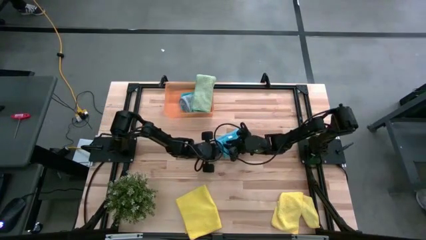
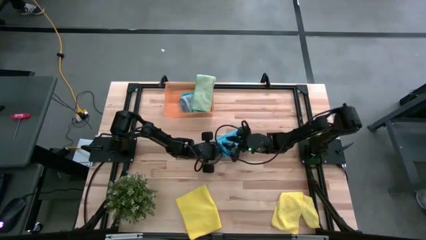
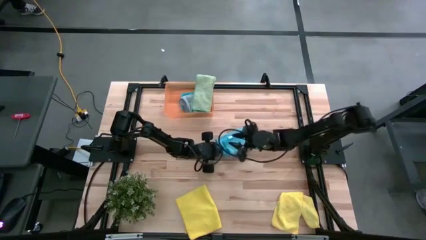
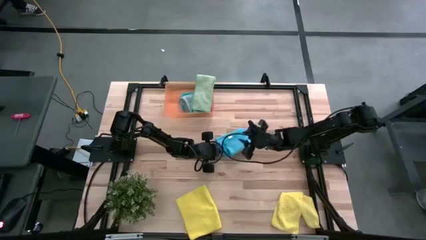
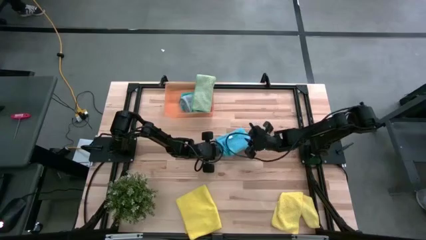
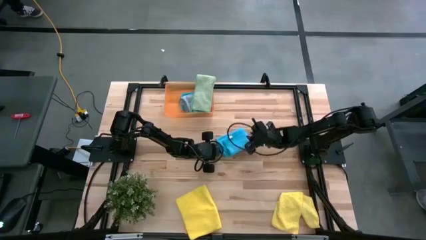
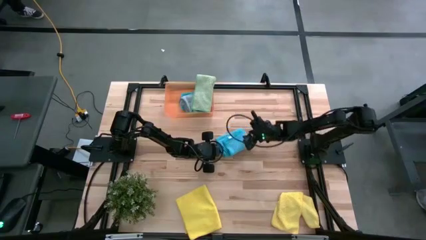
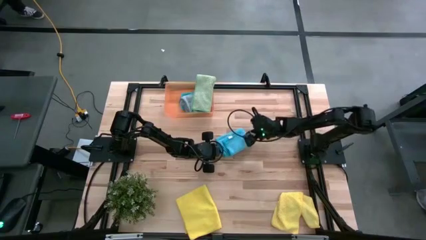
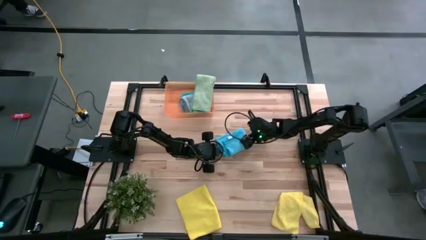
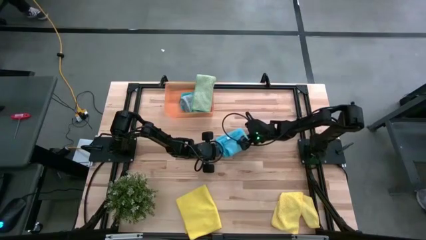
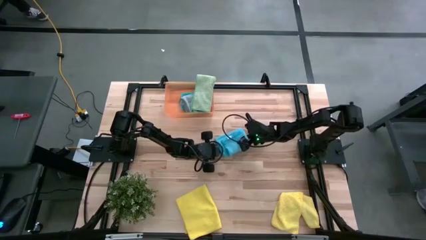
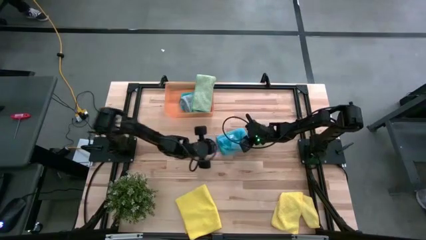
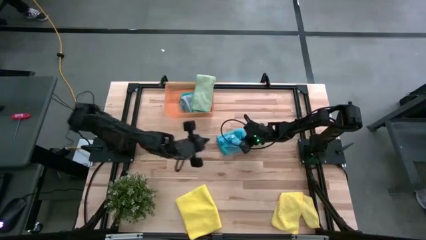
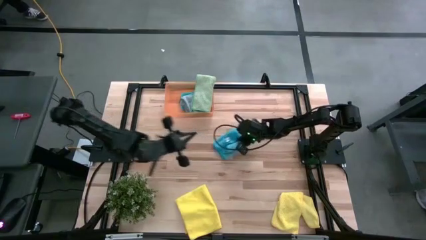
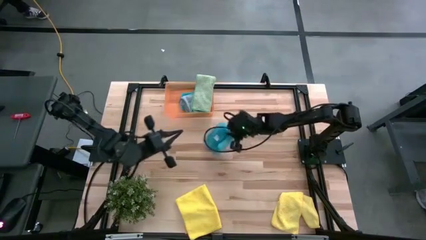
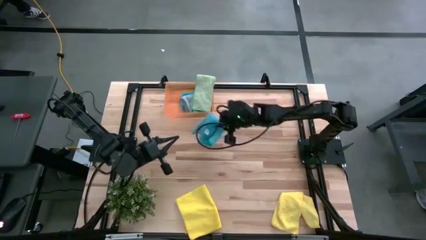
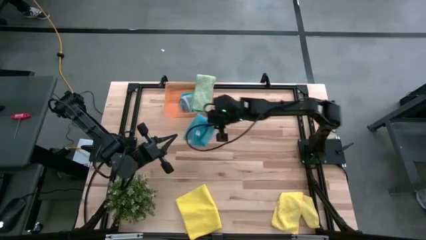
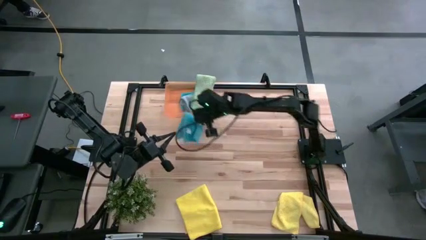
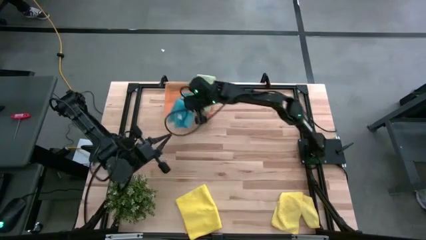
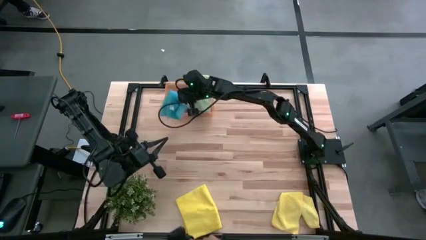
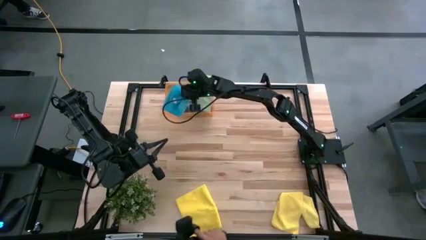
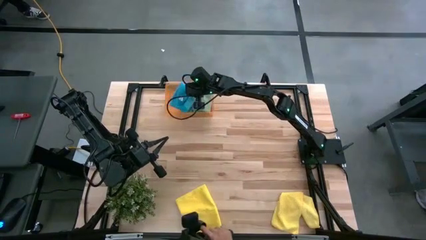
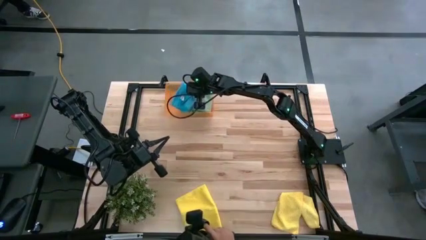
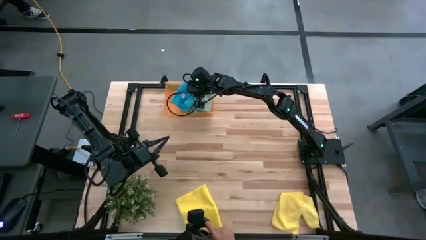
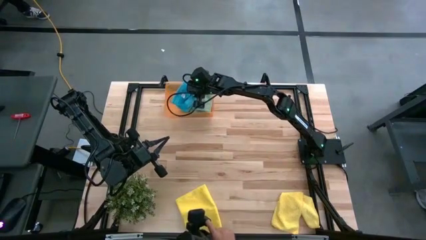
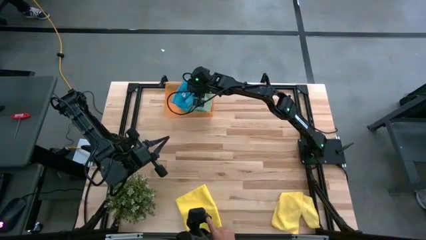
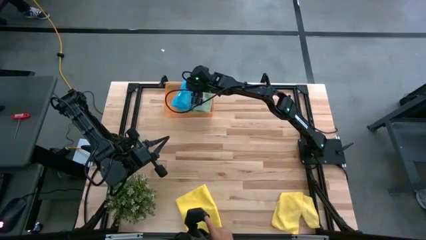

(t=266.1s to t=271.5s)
Task: Fold microfiber towels
Put the blue microfiber cloth into the orange bin

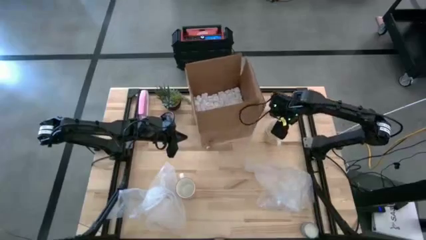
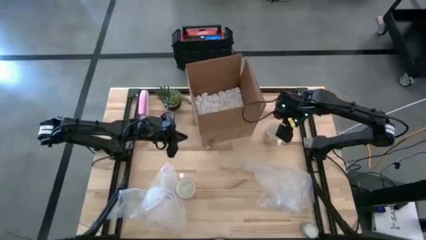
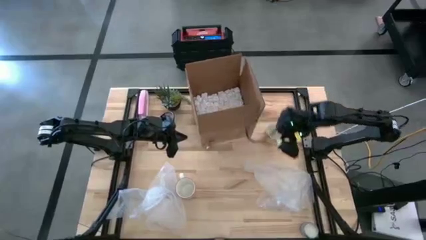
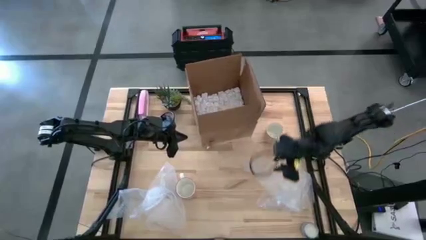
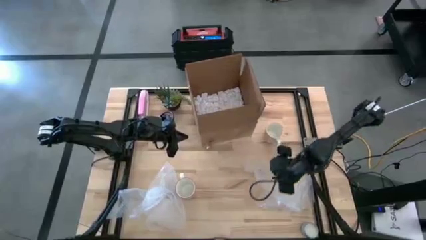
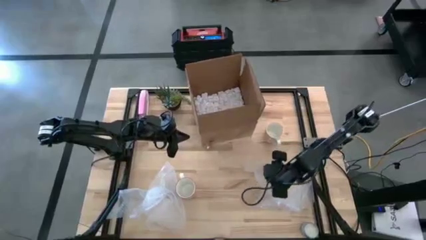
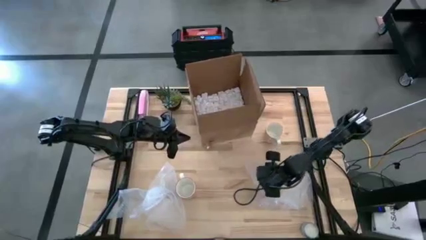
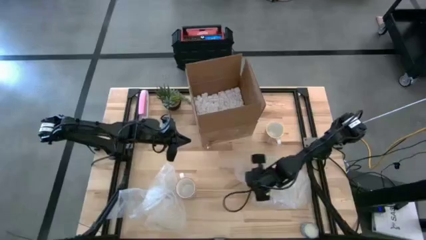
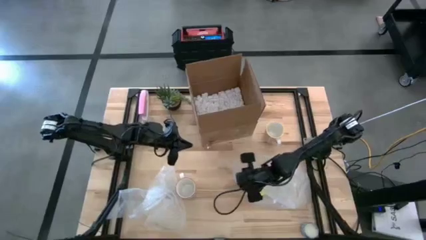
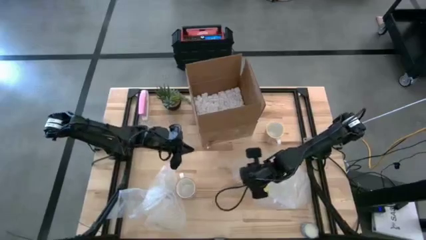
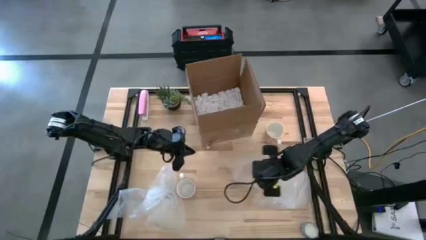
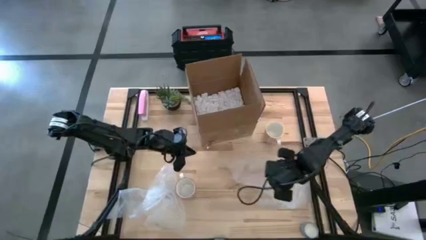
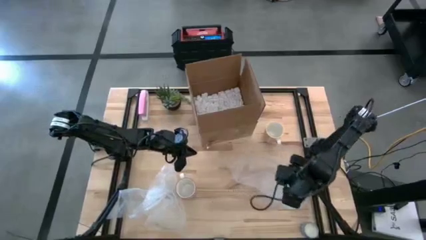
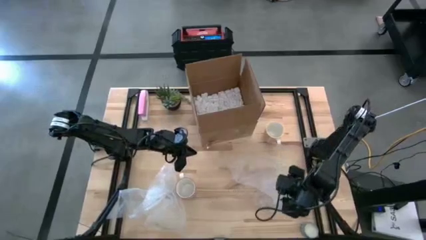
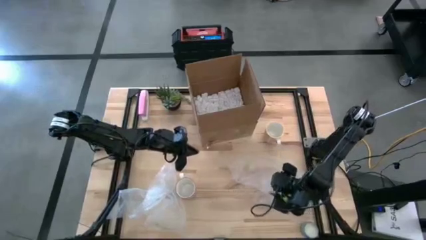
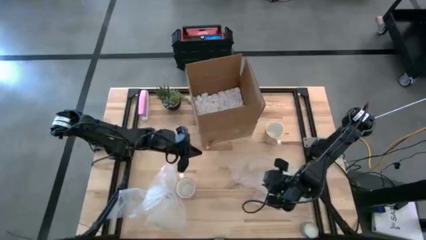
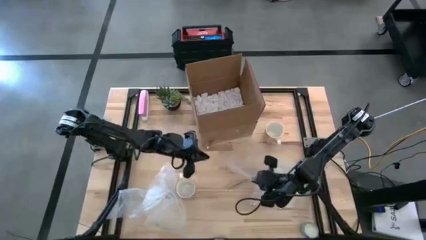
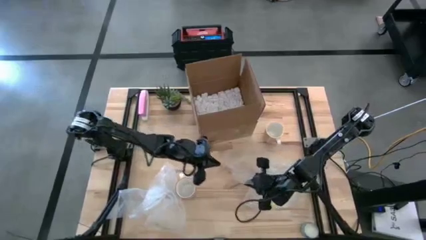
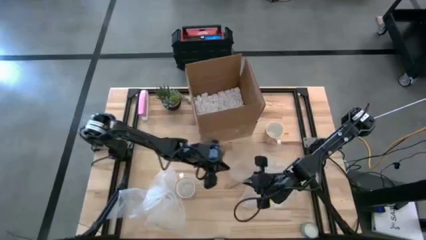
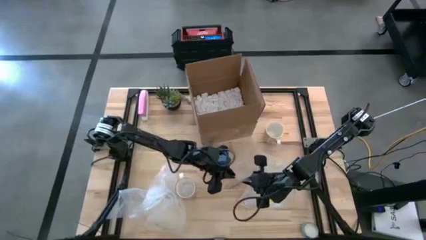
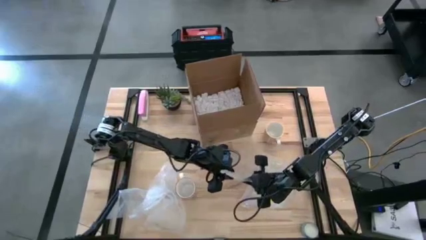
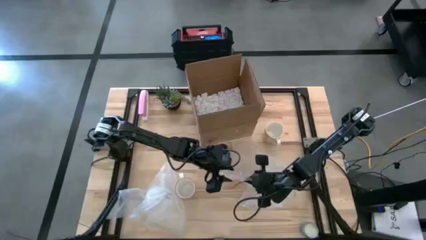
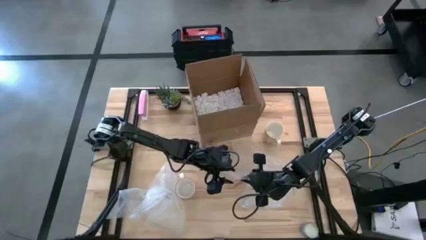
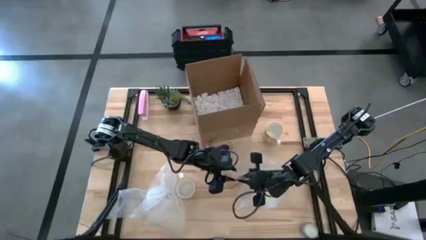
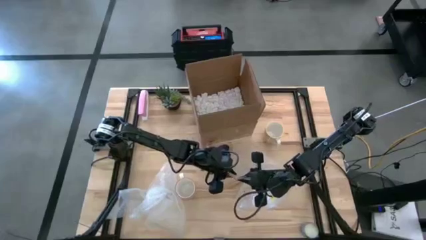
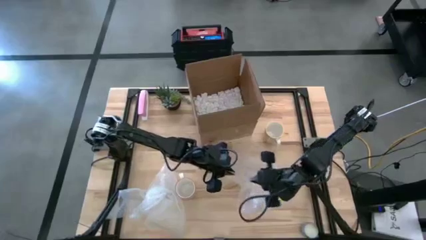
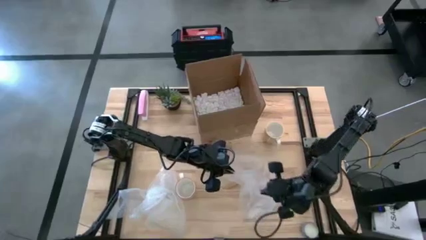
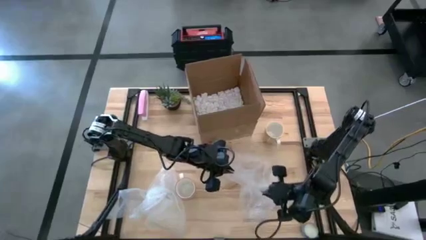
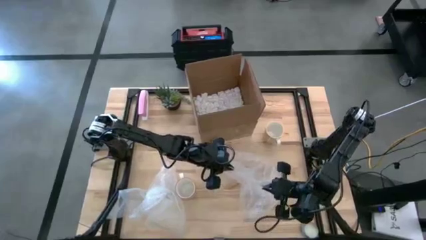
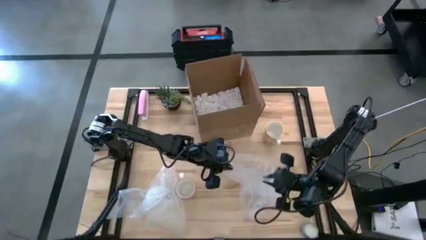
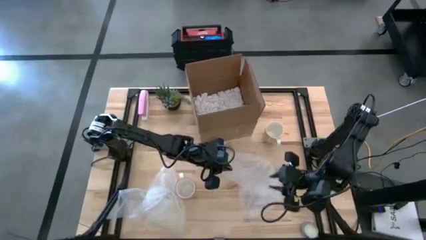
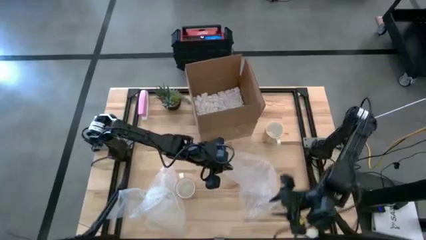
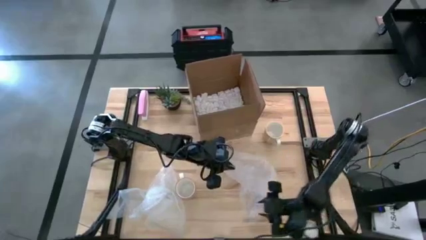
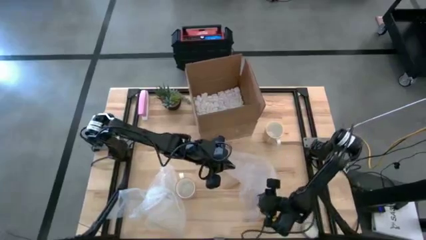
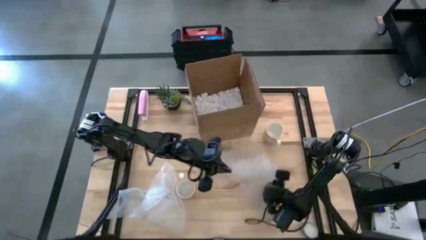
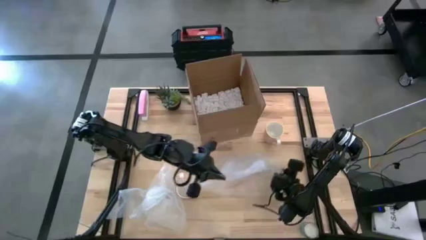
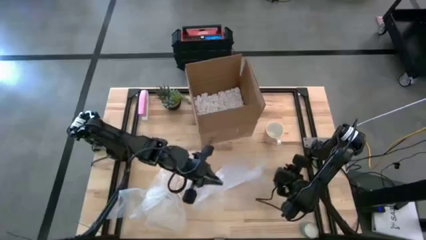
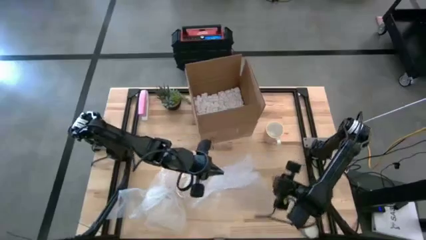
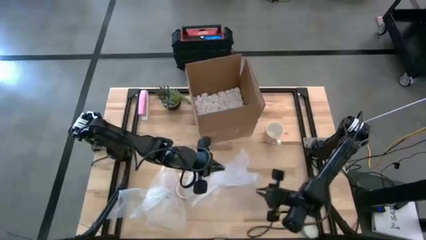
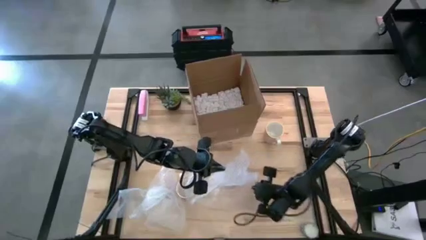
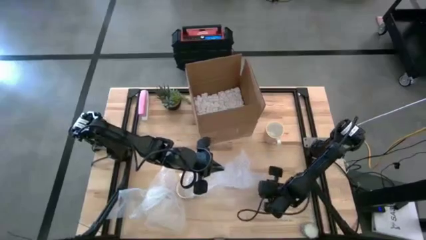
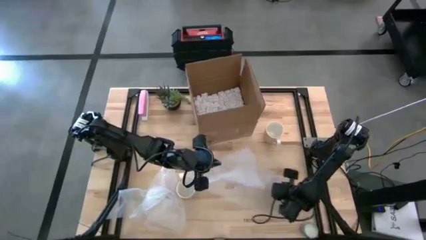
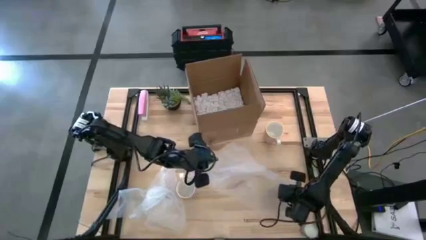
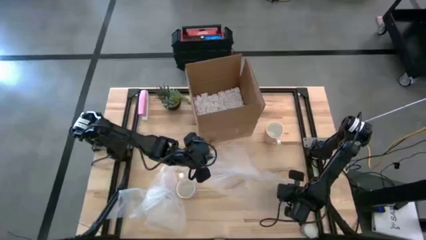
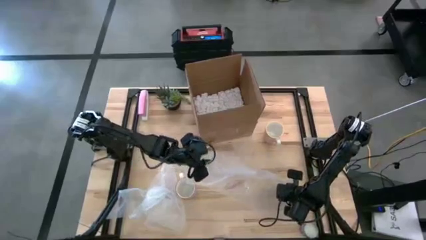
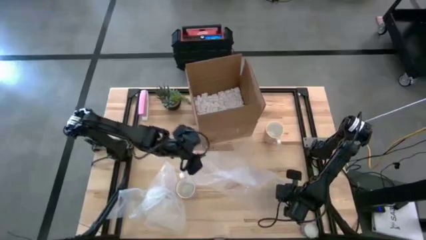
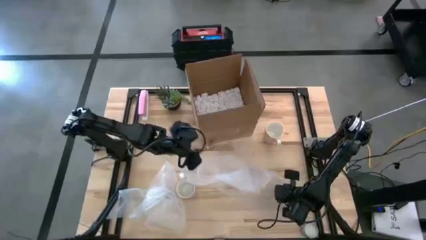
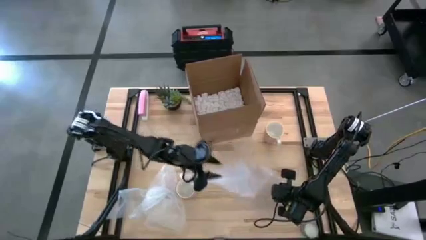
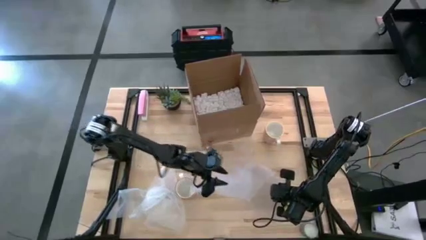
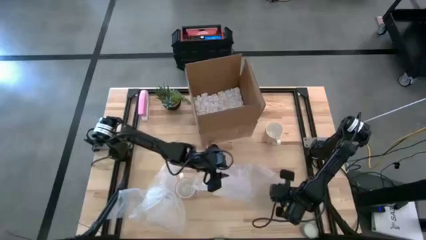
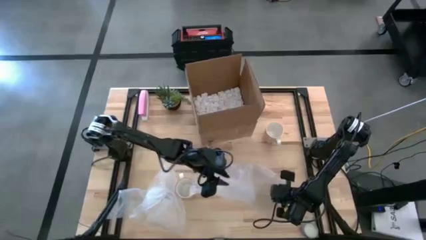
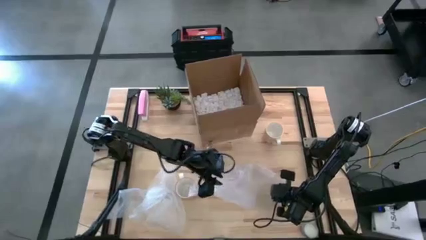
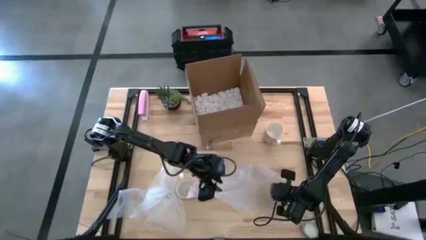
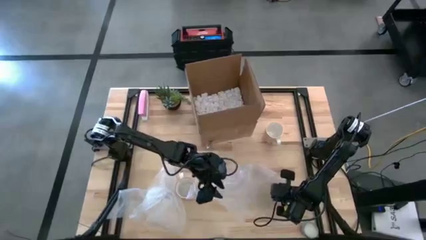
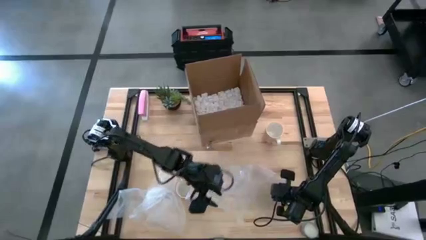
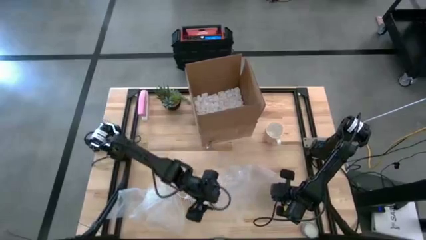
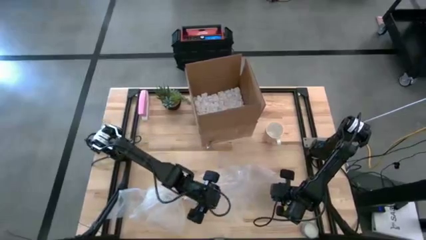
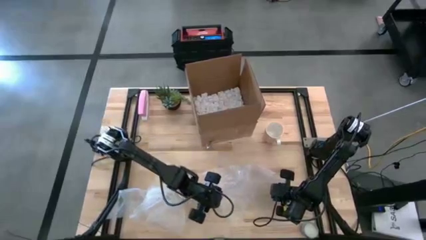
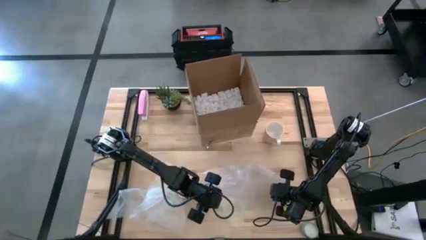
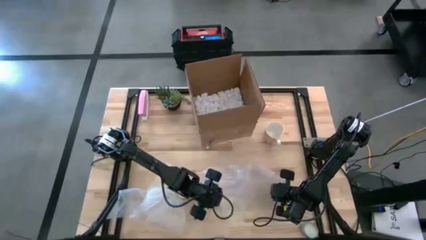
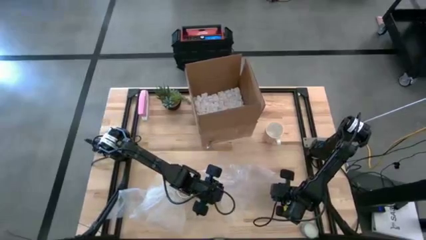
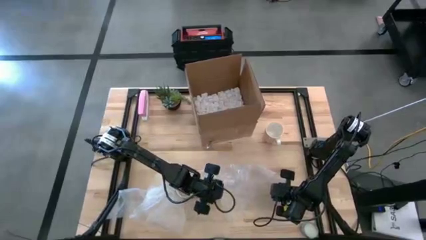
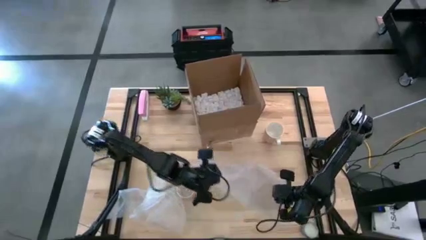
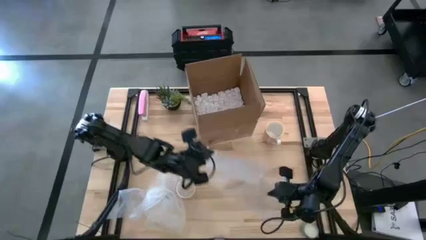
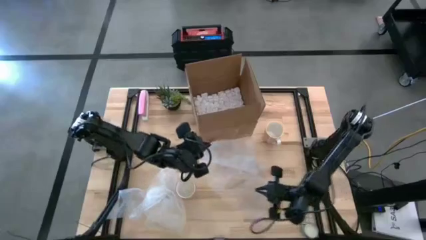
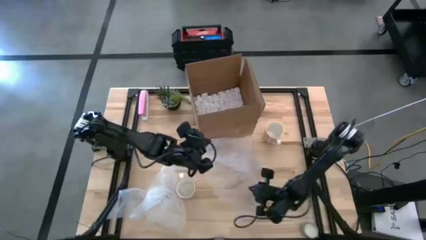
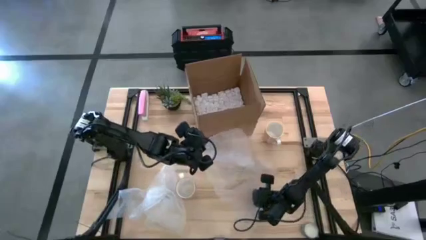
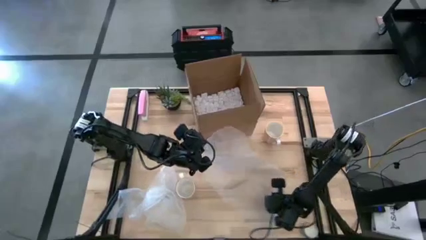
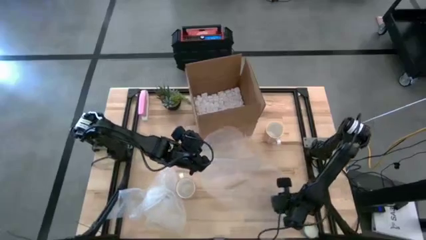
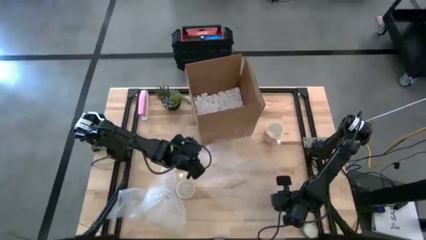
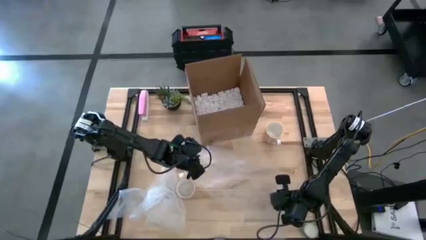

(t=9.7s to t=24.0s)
Task: wrap mug
Prepare the bubble wrap
